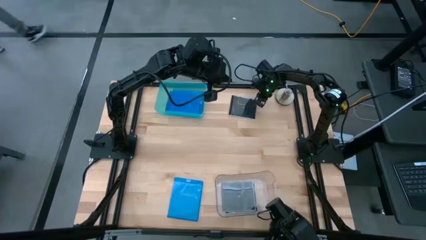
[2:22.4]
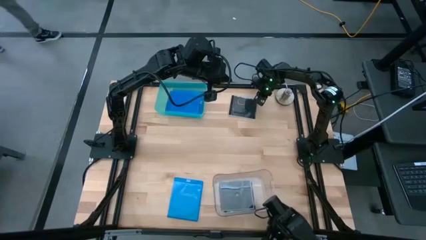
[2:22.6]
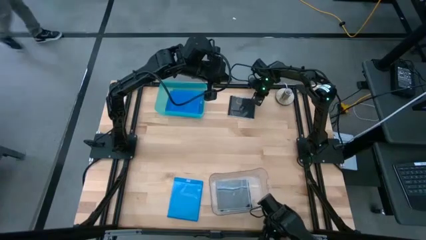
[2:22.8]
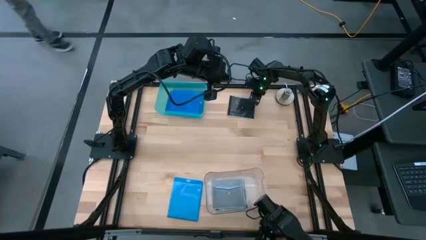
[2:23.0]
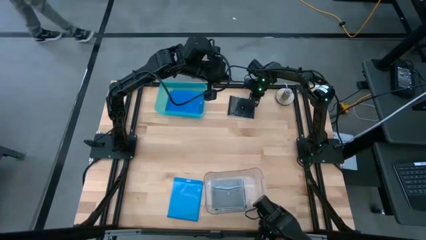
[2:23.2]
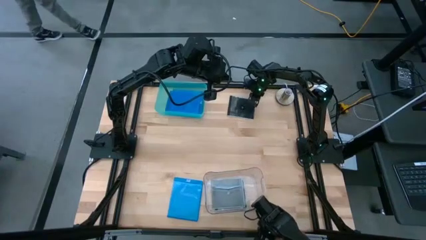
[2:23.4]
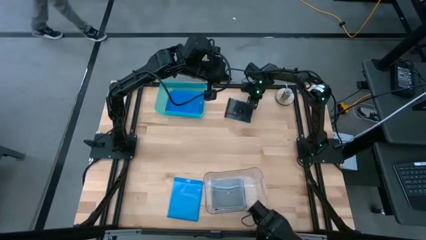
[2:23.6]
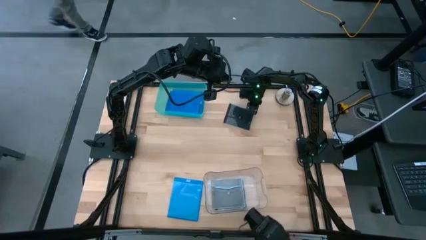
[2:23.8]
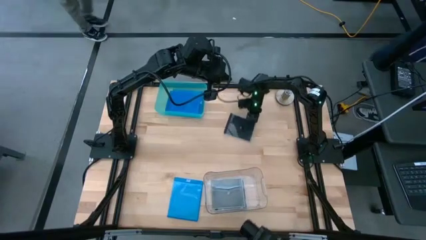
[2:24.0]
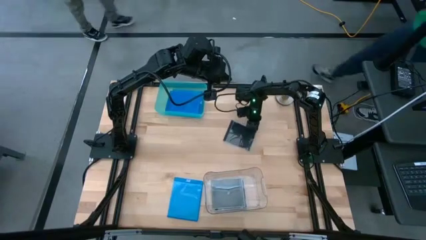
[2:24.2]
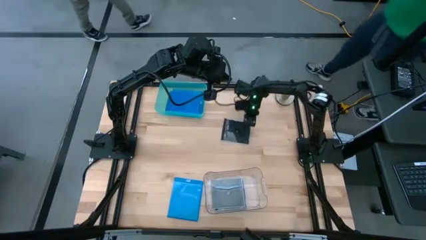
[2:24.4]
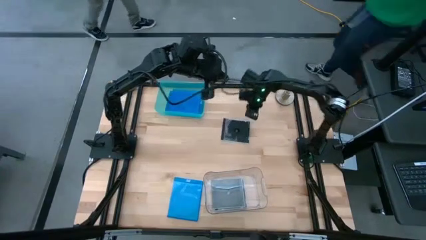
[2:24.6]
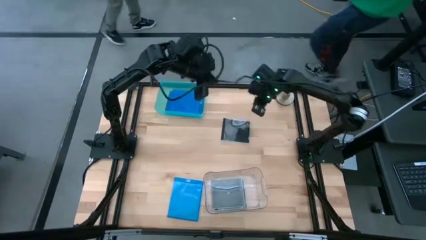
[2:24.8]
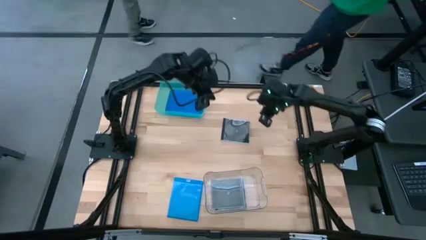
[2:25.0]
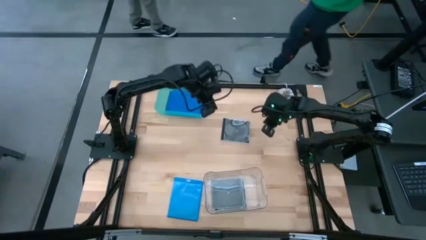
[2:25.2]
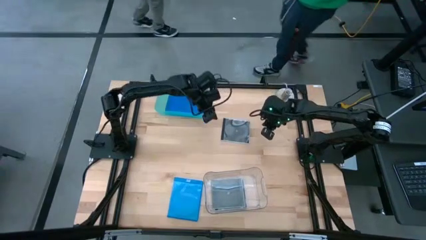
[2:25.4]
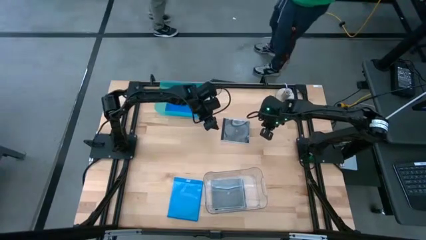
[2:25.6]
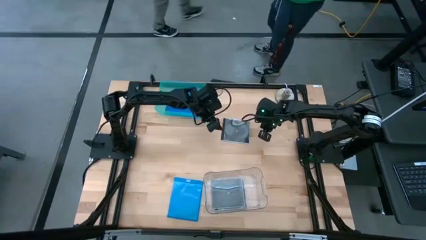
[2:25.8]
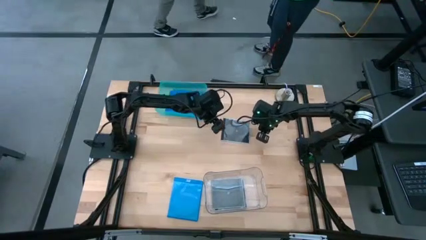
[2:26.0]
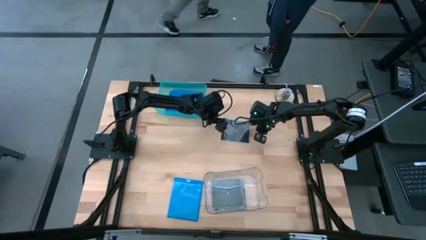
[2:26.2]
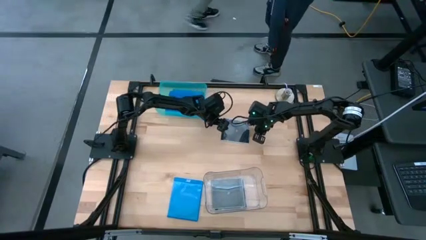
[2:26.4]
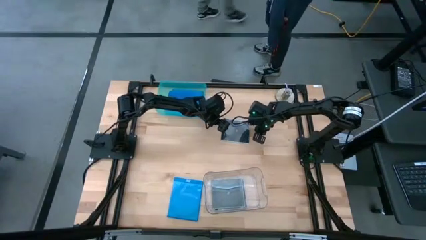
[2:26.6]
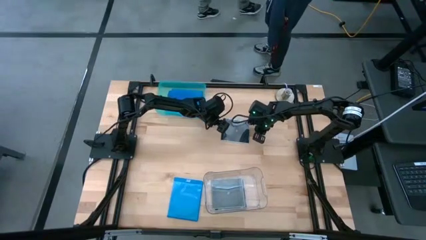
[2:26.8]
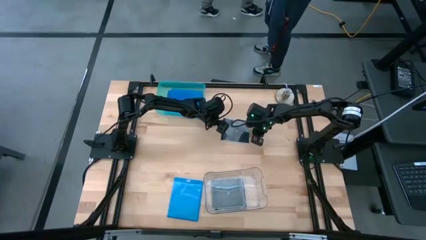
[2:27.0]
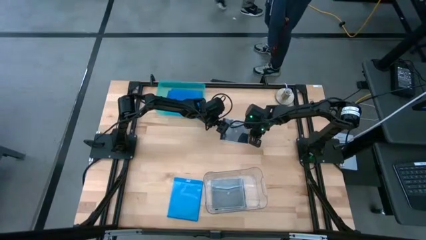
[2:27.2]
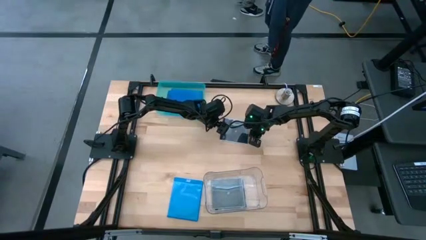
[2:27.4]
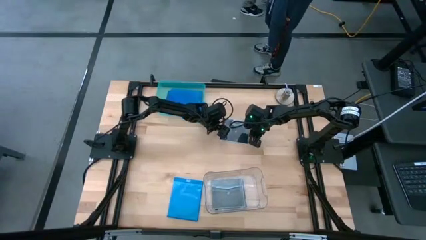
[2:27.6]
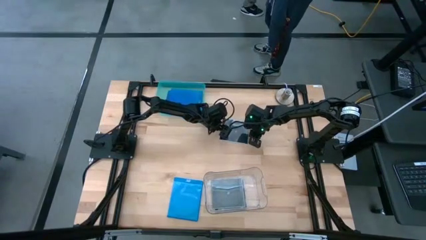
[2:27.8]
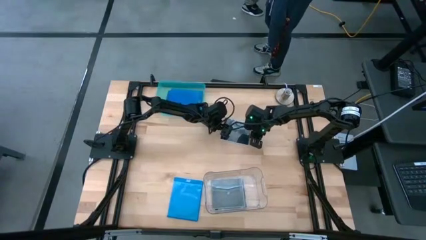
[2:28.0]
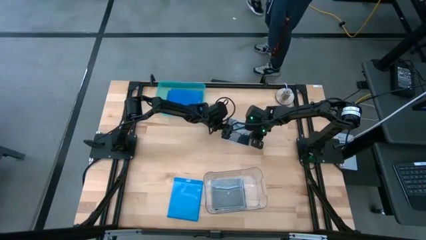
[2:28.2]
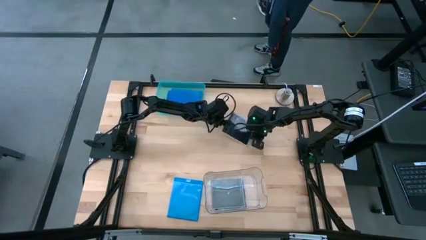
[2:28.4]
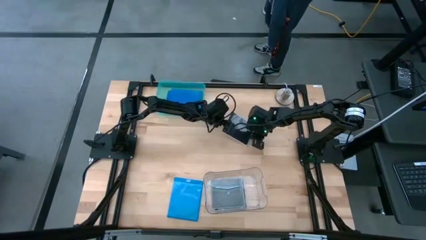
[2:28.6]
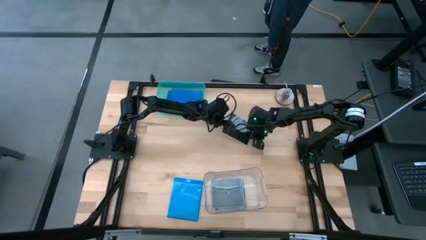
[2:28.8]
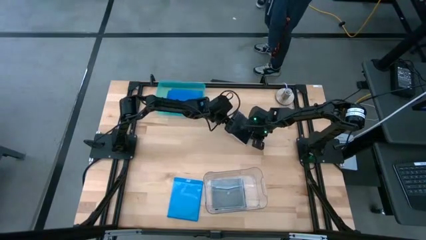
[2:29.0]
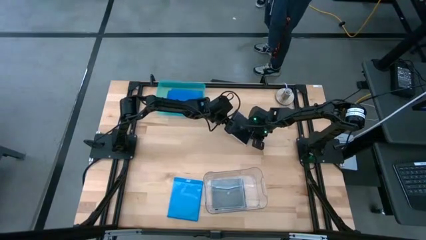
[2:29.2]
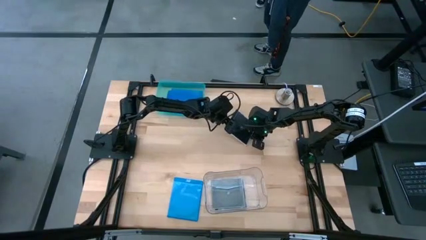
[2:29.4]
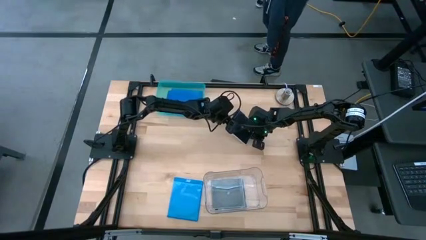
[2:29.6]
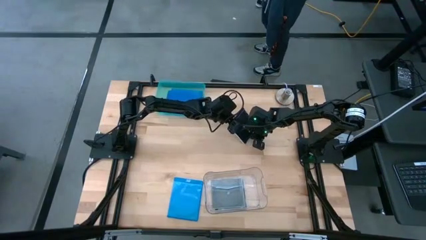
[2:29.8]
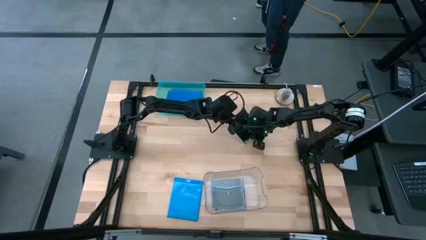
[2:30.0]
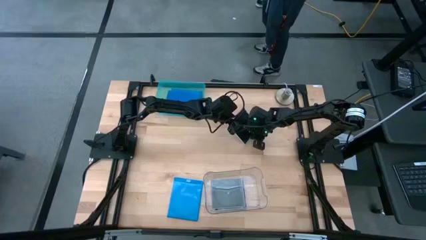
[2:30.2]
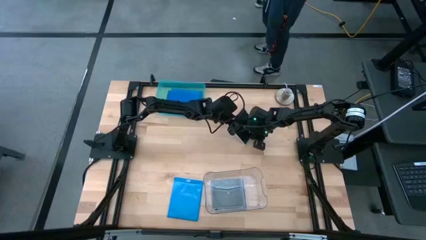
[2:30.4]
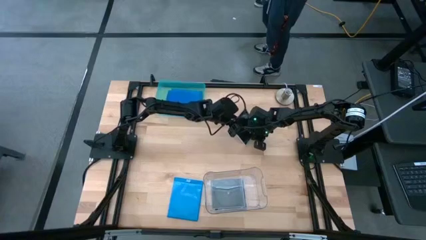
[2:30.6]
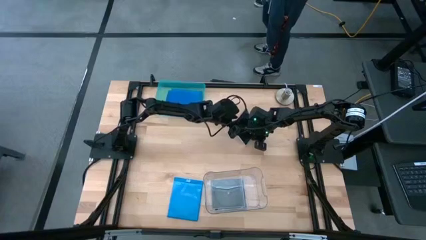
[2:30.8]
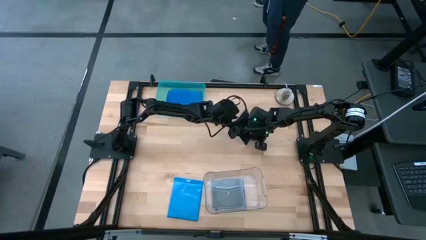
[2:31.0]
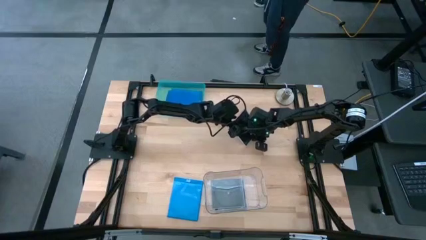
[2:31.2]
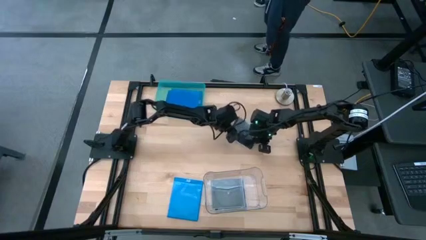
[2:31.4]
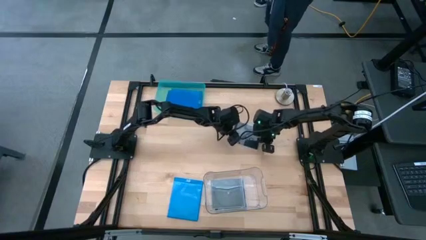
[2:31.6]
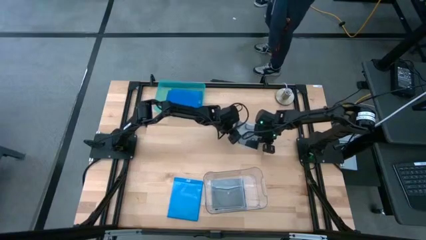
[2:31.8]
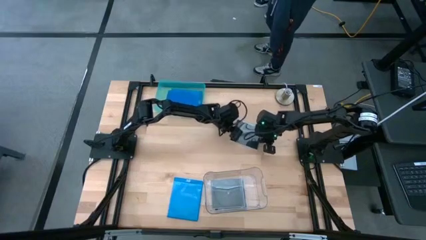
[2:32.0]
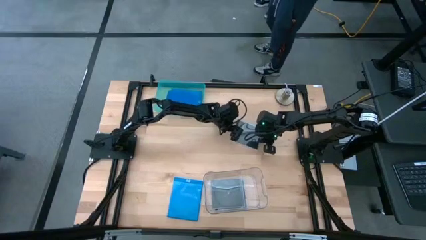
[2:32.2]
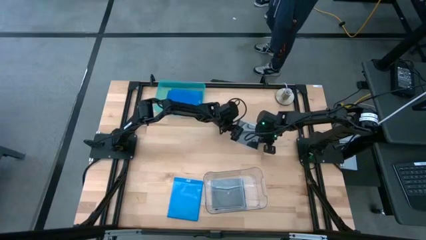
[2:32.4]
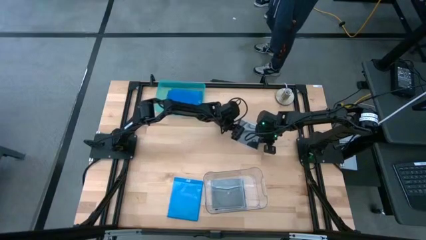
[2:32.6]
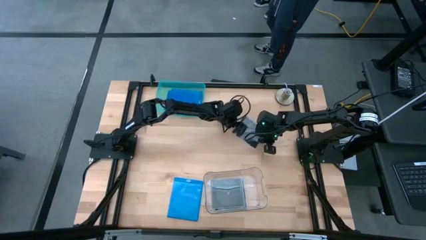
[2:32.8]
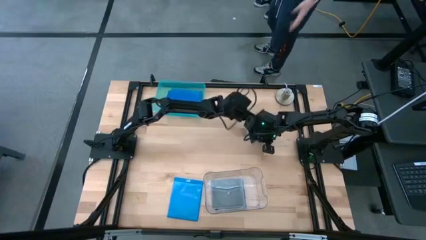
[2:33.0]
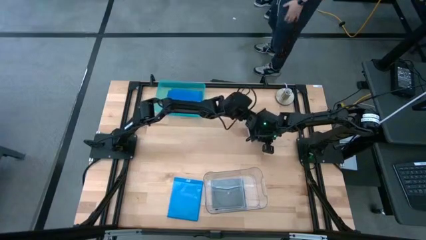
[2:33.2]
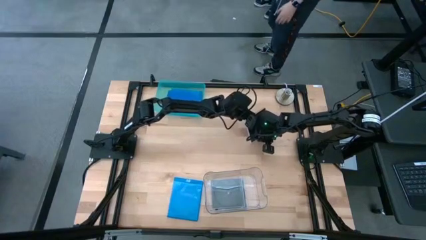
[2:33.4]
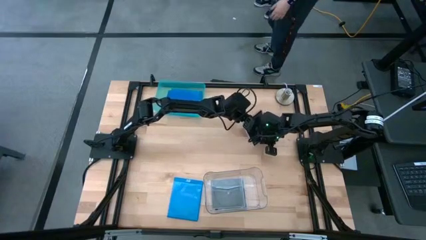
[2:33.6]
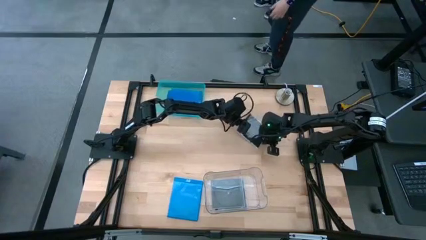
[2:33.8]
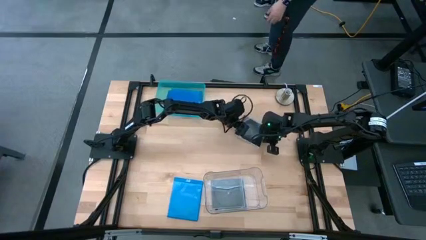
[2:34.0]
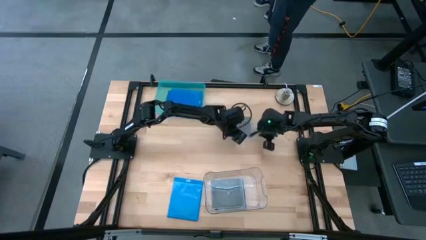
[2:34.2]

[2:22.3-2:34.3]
Task: Pick & place jewel cases by type
Put the black CD case into the transparent bin

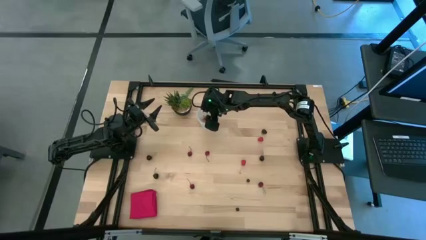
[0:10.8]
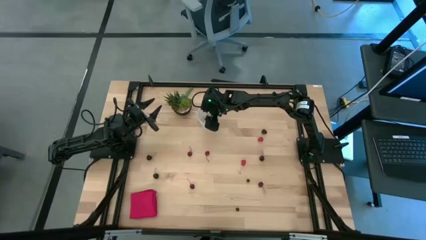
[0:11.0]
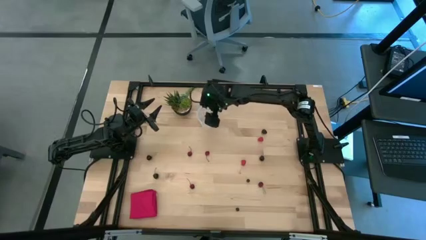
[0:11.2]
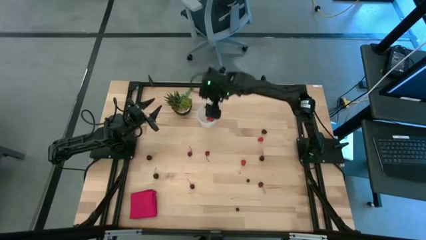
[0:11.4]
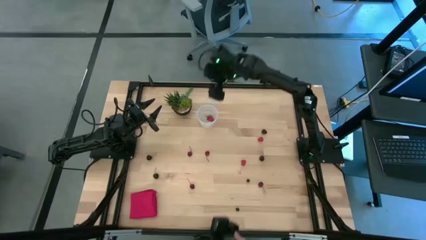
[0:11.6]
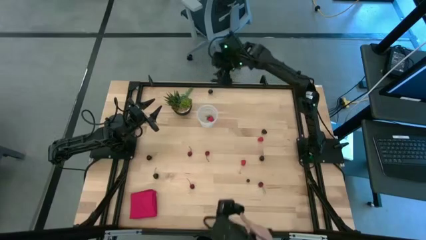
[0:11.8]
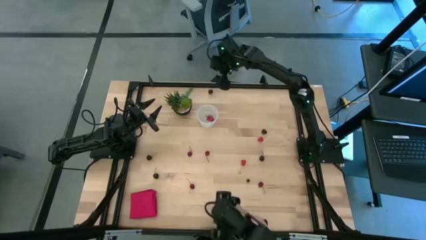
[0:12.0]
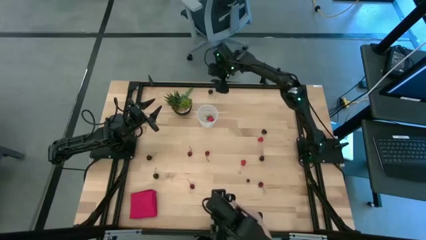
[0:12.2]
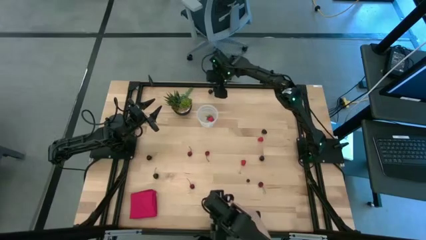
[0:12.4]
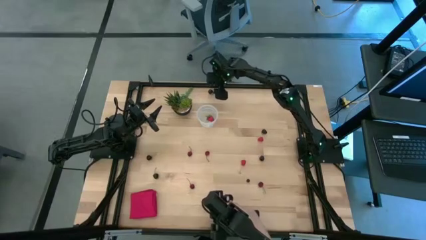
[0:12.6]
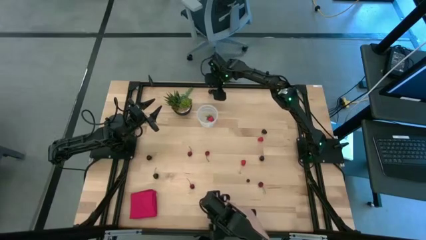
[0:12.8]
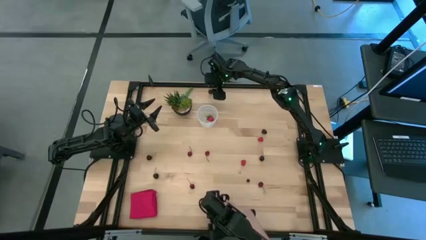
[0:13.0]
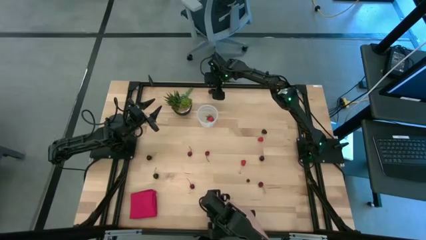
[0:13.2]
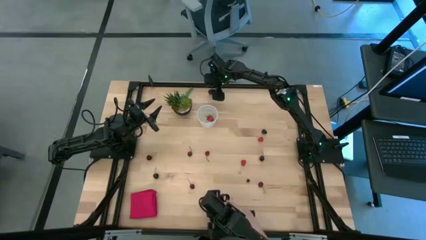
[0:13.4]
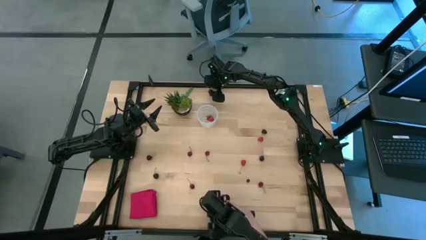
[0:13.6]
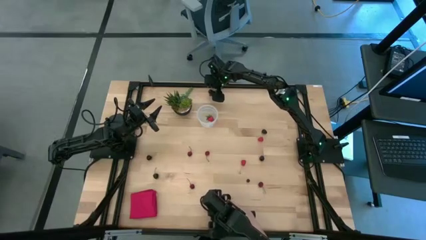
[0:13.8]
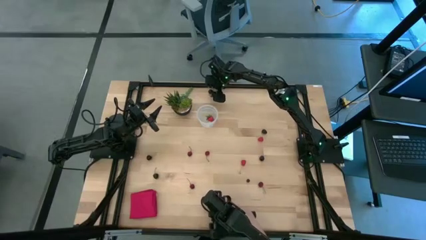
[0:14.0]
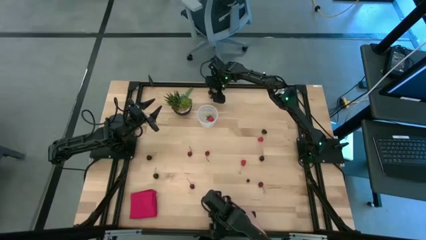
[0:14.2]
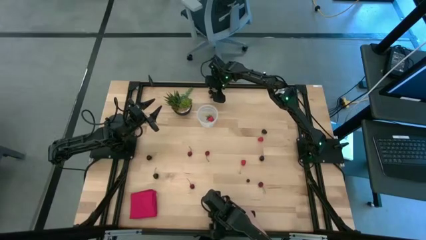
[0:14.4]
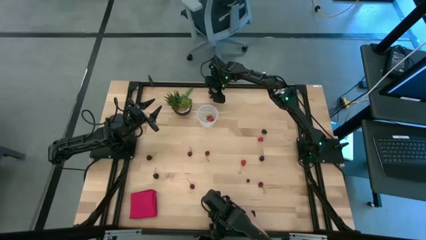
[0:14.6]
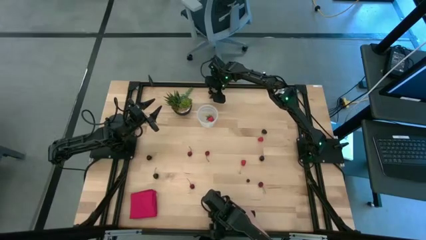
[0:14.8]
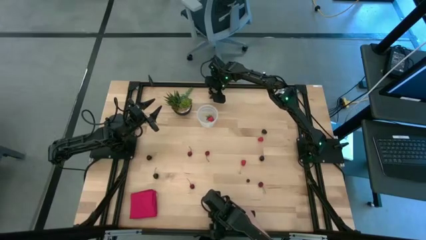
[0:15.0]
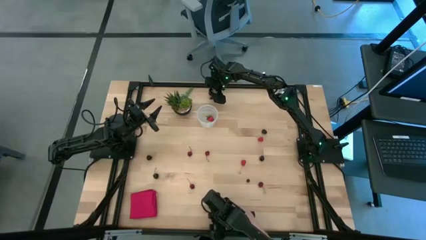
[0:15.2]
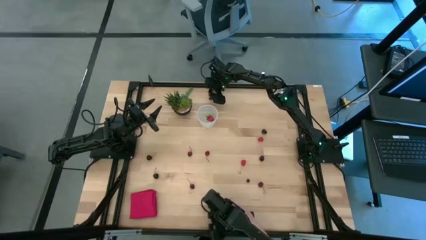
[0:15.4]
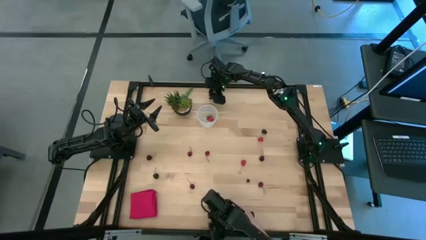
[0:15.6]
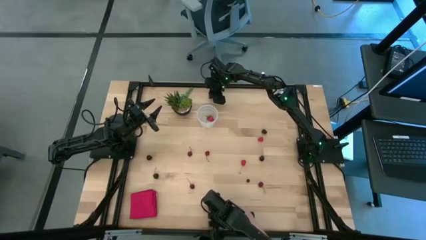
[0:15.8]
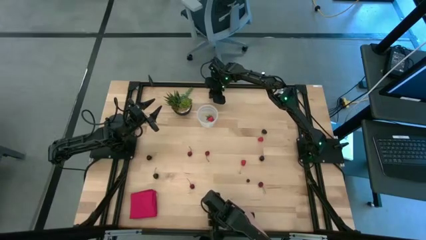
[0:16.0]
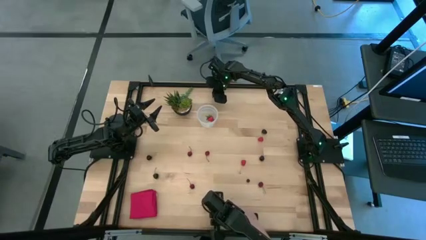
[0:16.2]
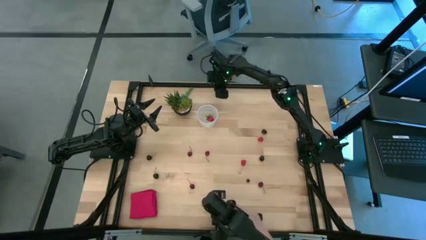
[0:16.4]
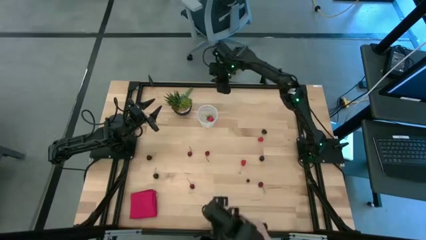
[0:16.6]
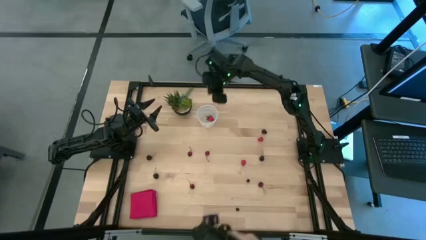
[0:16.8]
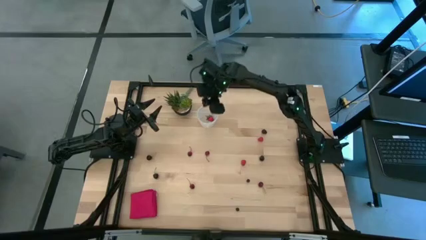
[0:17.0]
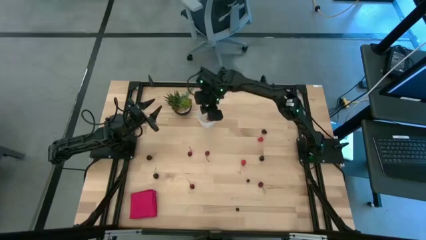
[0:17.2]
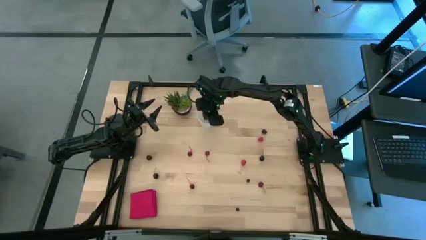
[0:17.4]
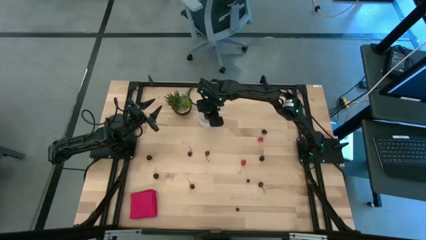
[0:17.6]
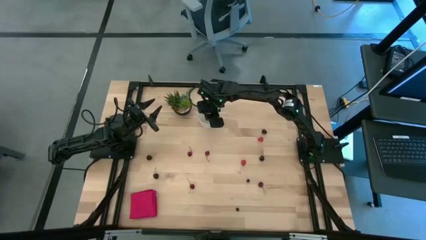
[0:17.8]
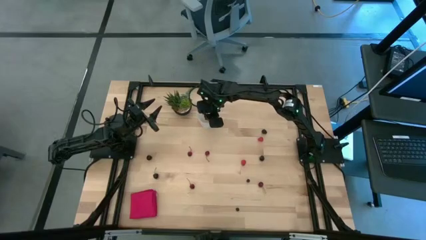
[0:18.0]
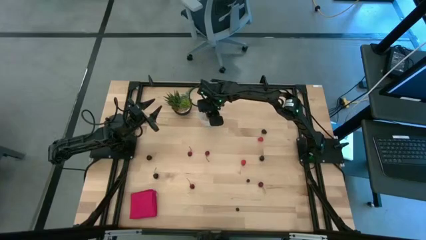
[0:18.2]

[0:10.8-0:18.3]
Task: Pick and placing Produce into tupperware
Put the black cherry into the transparent container
